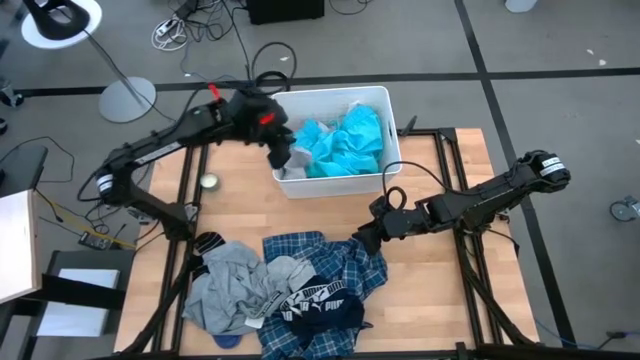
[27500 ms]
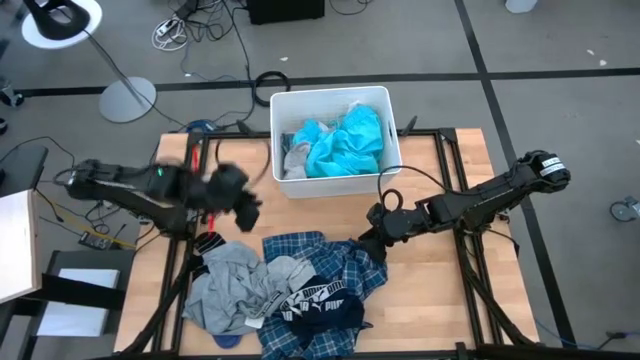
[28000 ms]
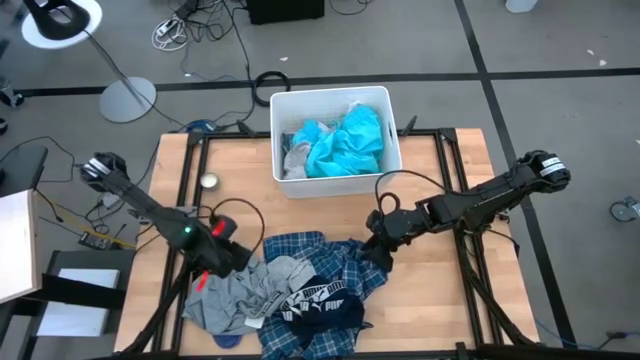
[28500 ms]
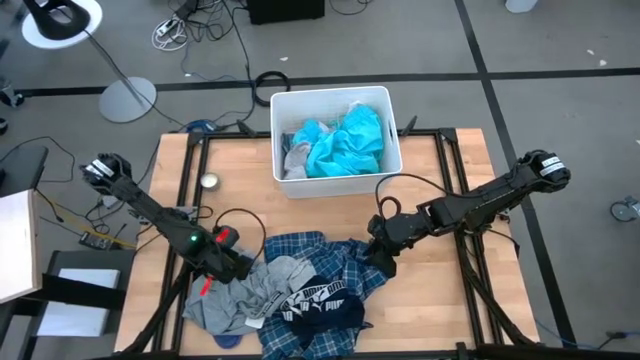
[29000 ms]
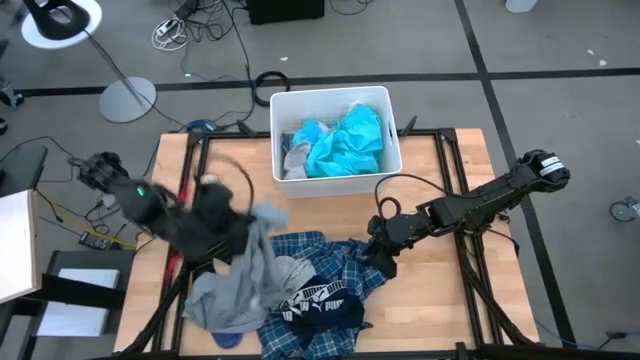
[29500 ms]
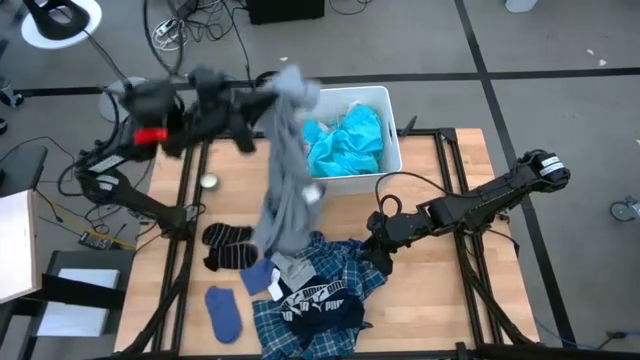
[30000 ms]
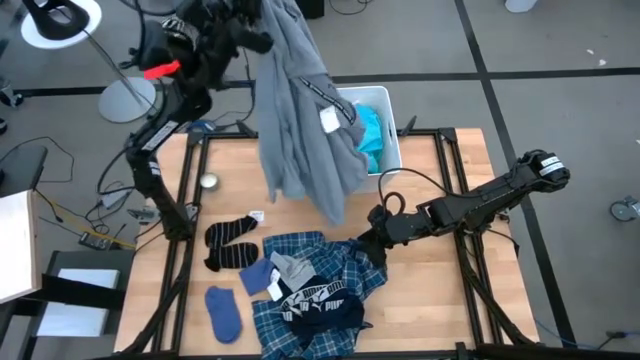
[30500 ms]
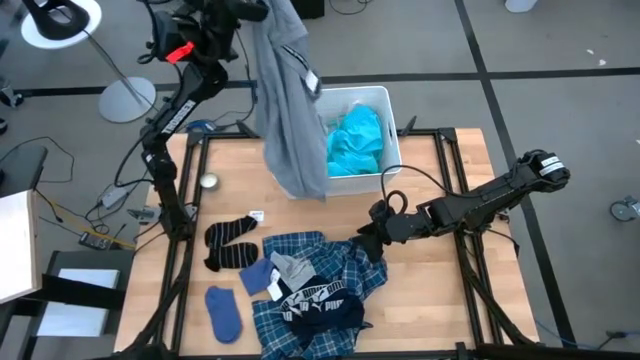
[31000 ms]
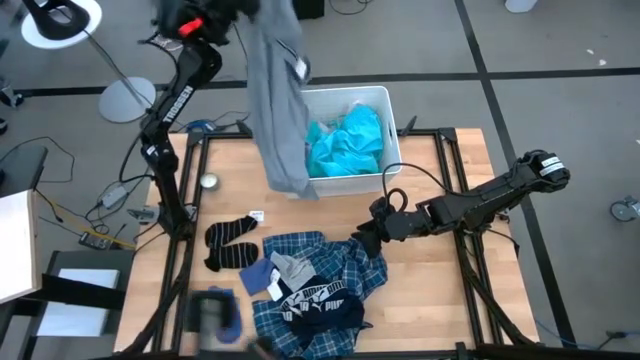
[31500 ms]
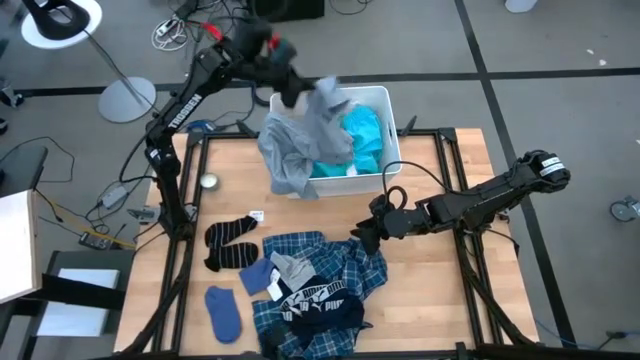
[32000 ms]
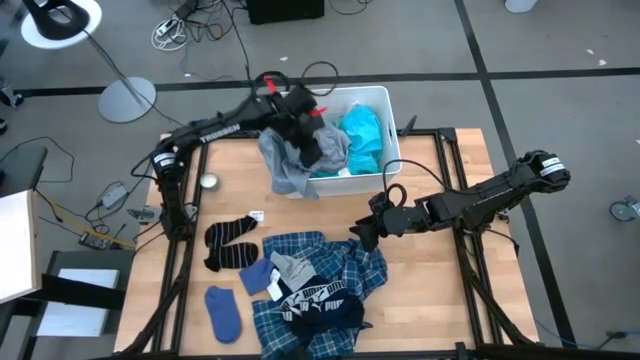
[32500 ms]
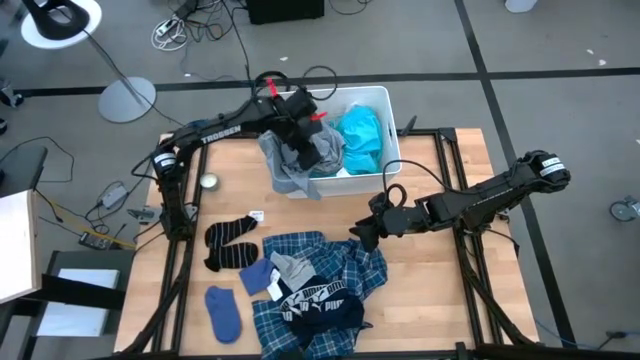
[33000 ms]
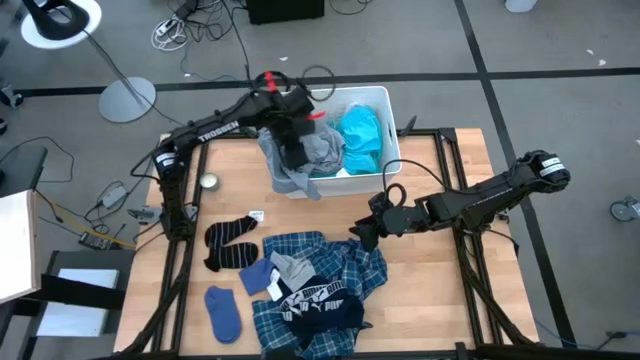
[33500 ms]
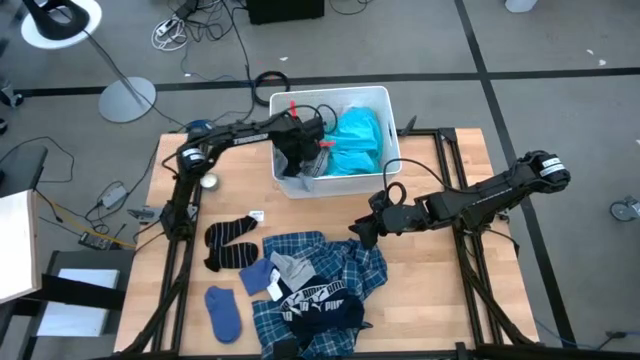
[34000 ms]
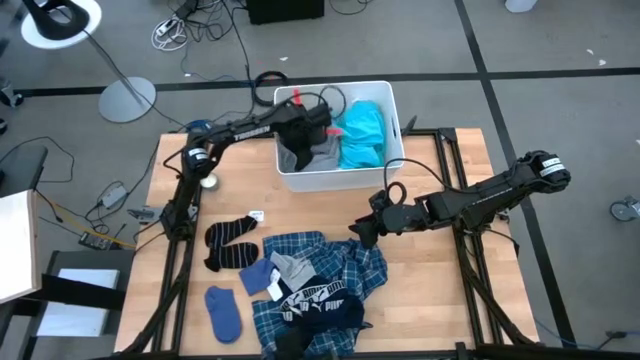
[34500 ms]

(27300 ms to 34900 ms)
Task: Sort clothes
Put the gray shirt into the laundry bin

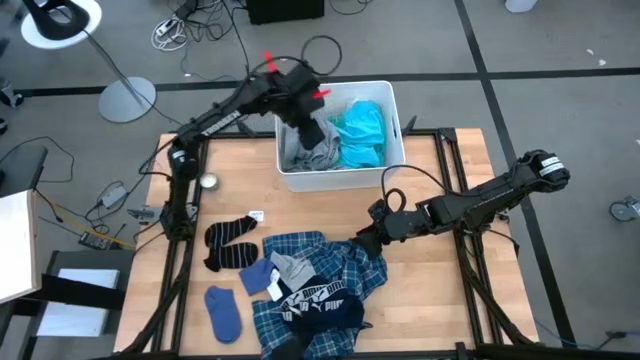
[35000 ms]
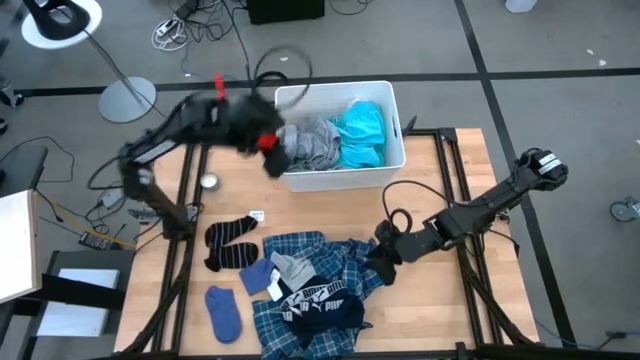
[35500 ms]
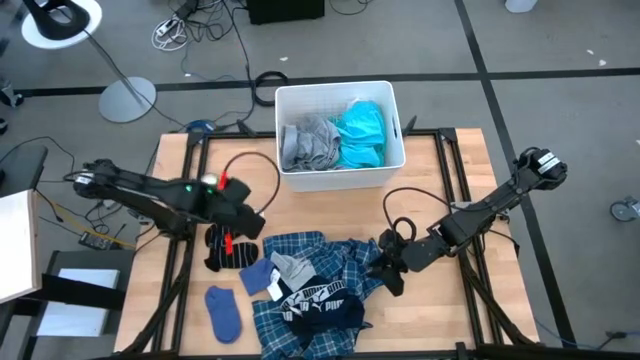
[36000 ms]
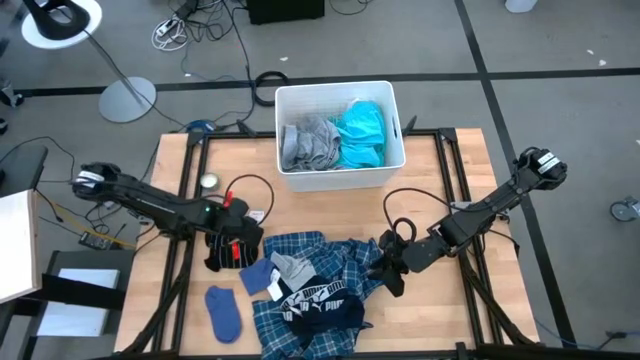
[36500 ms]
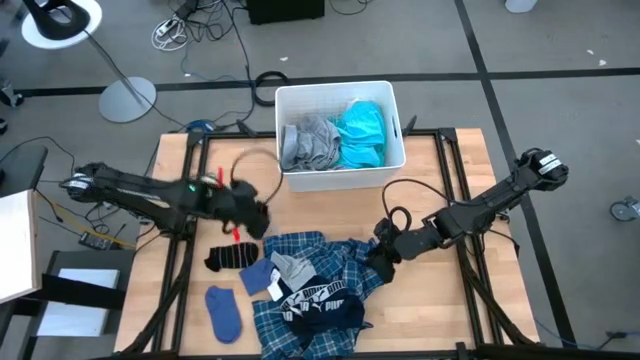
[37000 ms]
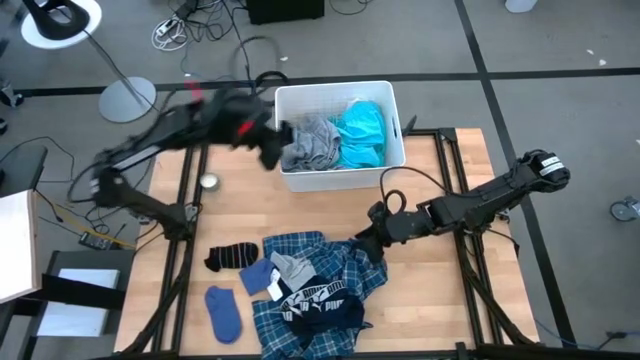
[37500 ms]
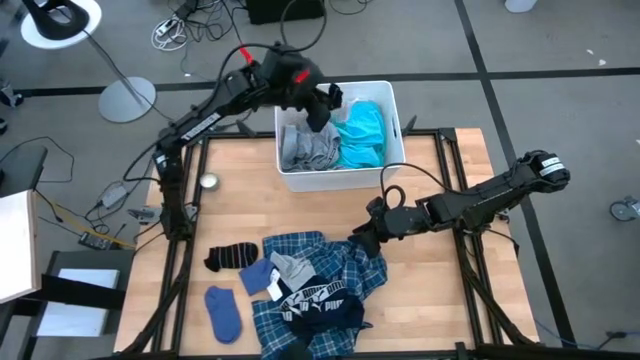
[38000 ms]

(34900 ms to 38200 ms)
Put the top black sock into the laundry bin

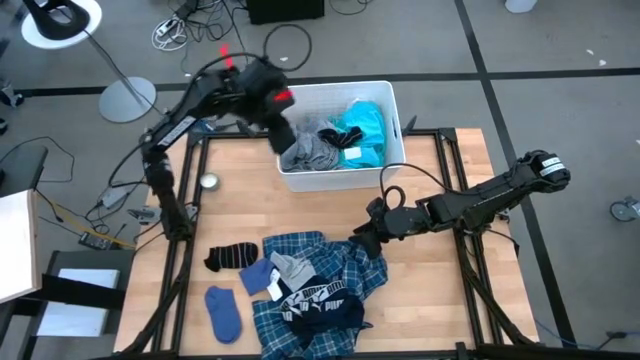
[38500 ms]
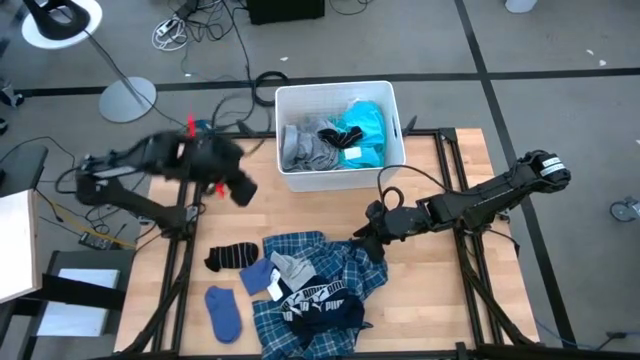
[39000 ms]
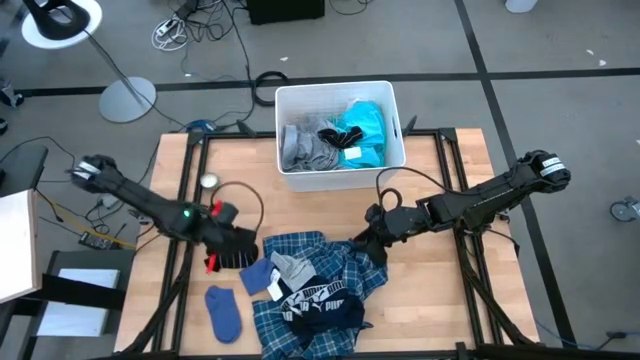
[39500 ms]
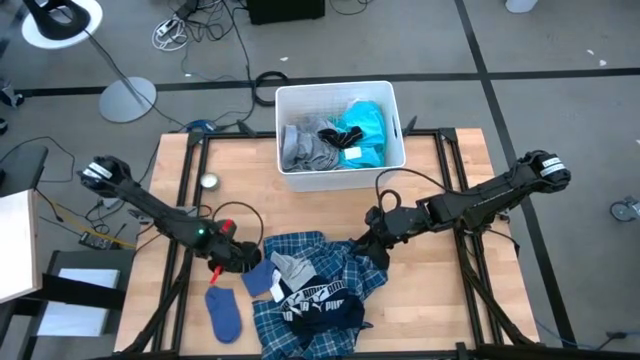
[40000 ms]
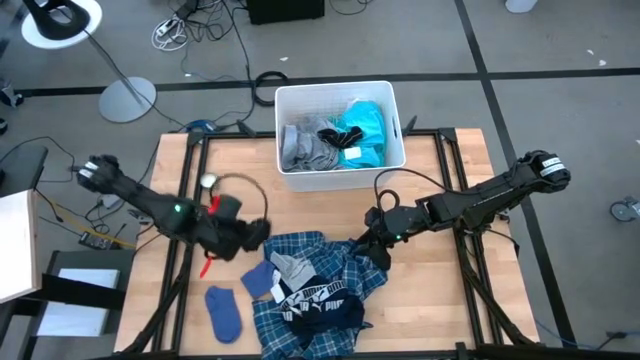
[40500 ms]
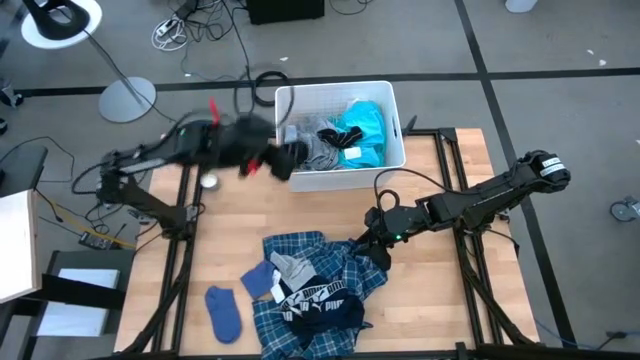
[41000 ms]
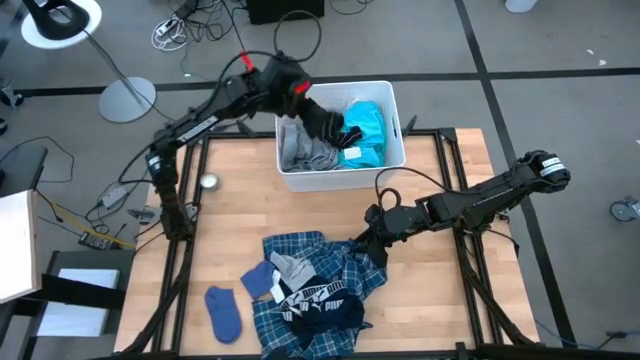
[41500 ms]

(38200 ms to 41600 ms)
Put the black sock into the laundry bin

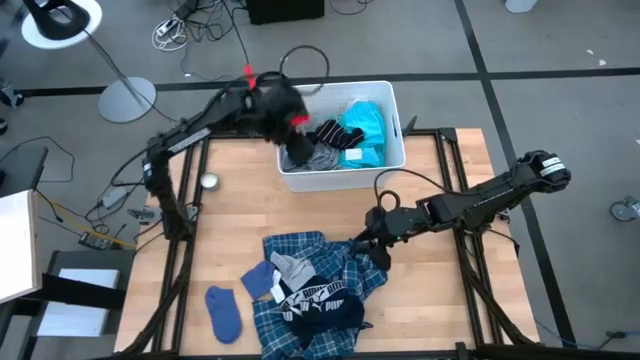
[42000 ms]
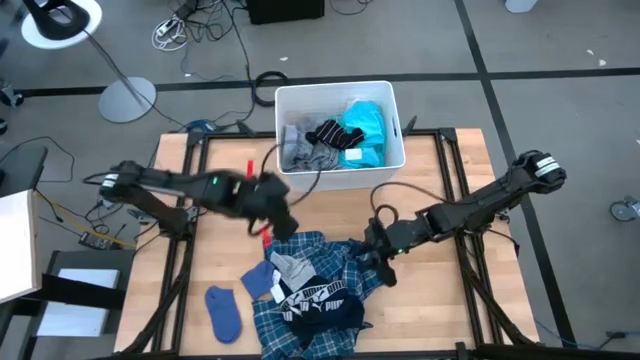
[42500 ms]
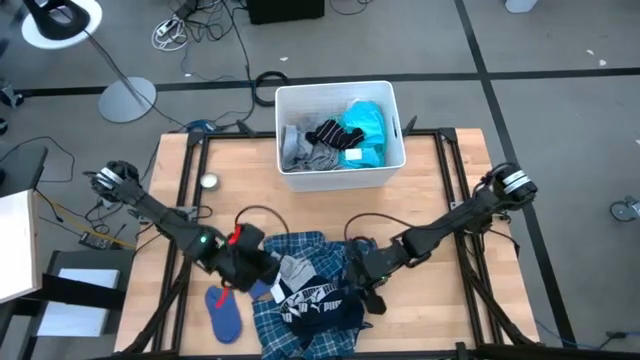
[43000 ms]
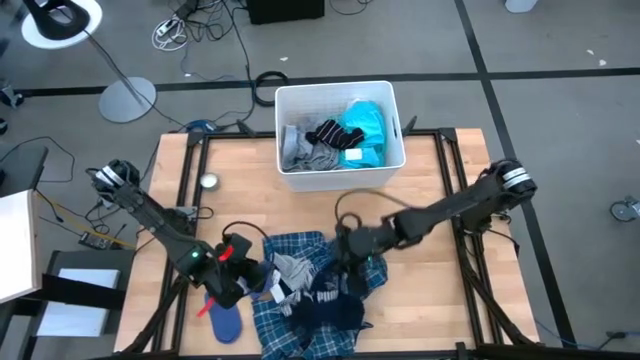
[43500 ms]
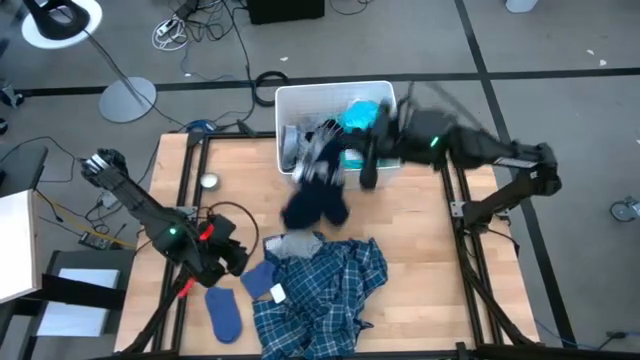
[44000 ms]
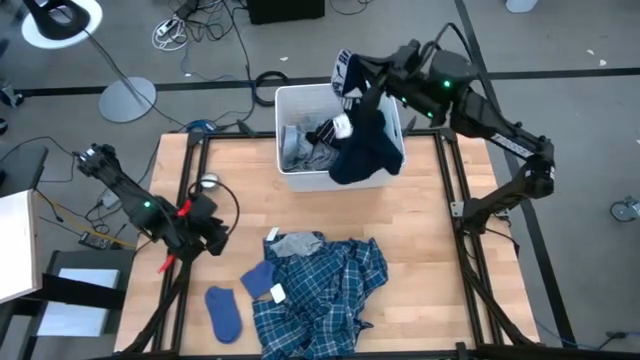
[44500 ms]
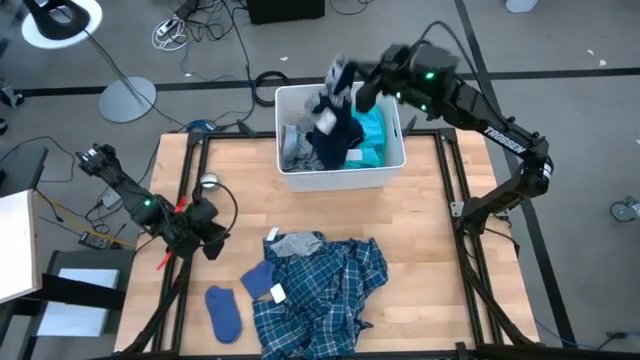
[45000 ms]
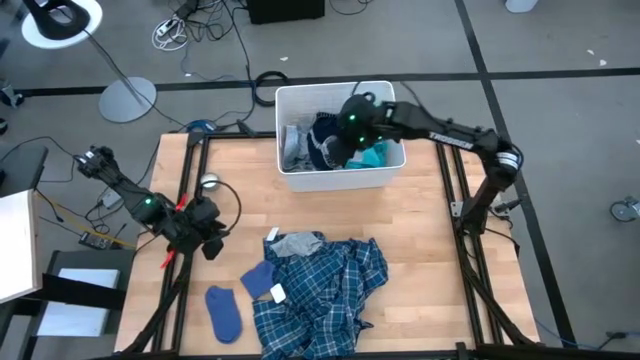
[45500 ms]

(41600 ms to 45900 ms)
Put the black boxer into the laundry bin

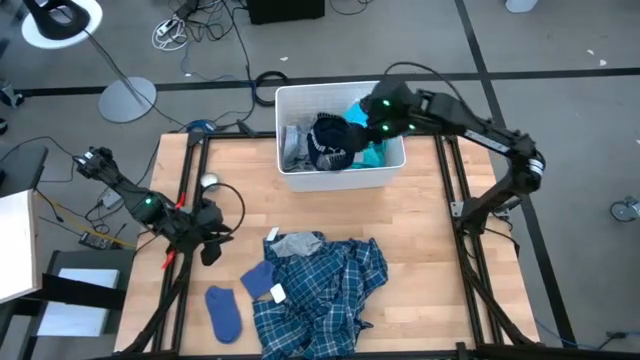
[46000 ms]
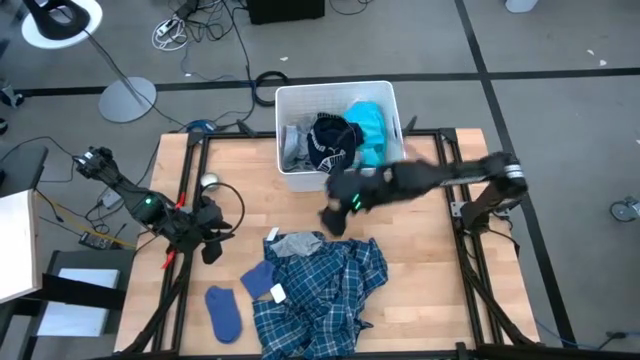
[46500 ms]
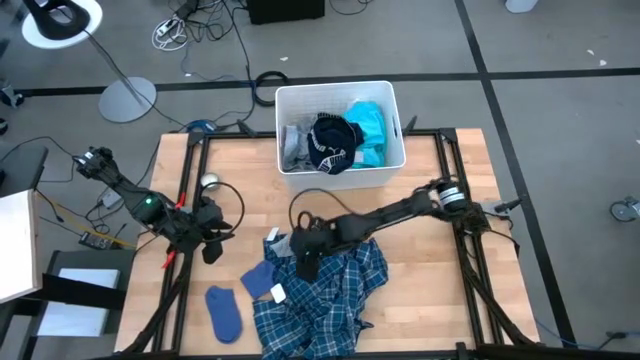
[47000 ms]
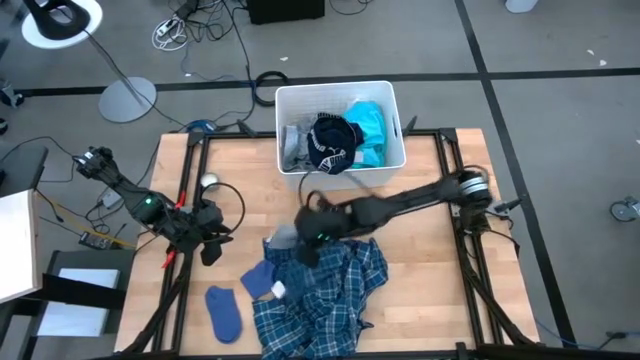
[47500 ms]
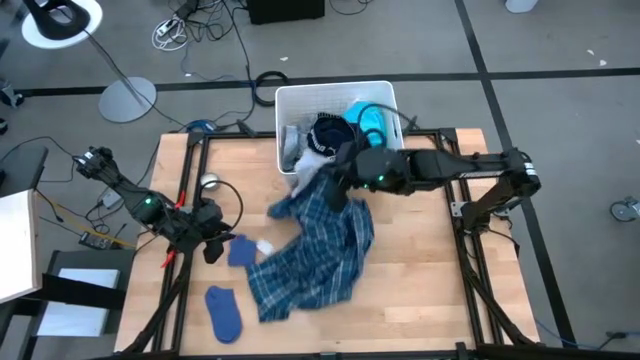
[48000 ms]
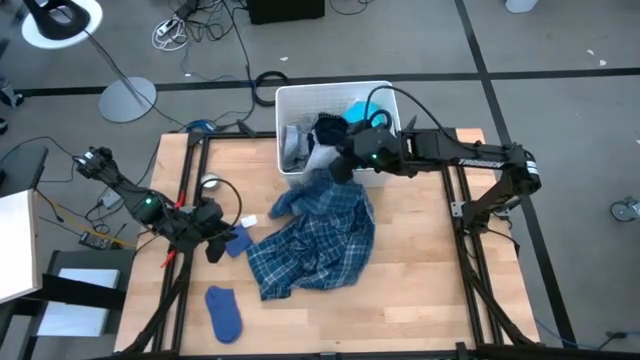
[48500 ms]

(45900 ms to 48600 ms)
Put the gray sock into the laundry bin

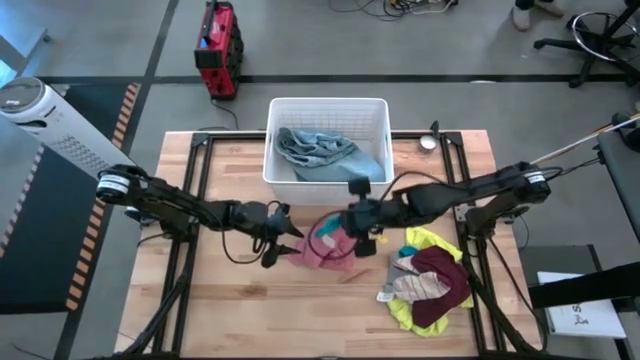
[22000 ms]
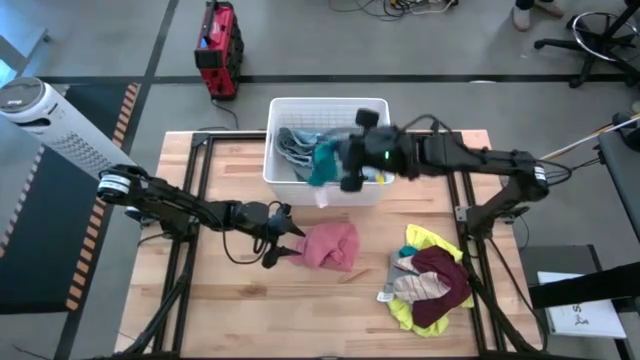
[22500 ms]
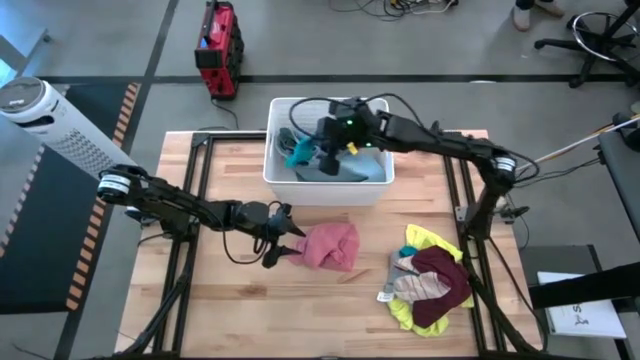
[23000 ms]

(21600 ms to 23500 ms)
Task: Sort clothes
Put the blue sock into the white laundry bin
